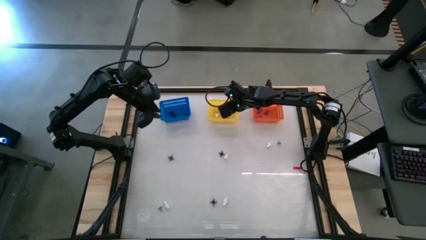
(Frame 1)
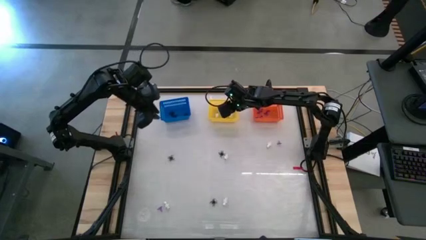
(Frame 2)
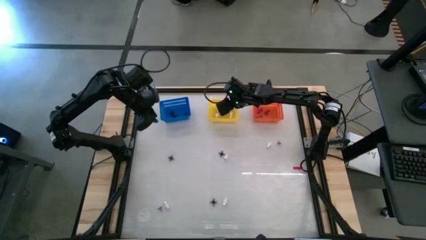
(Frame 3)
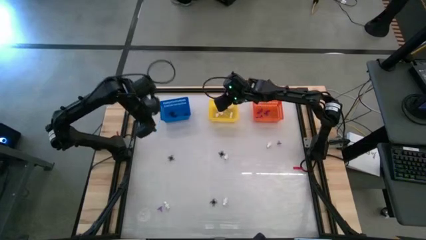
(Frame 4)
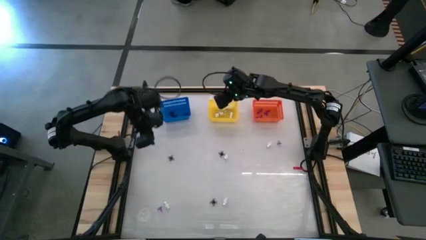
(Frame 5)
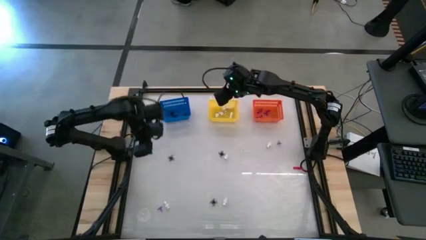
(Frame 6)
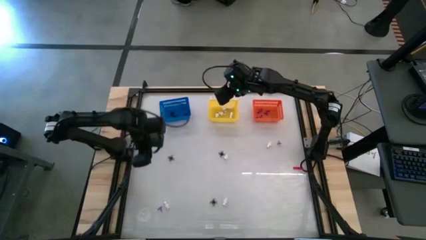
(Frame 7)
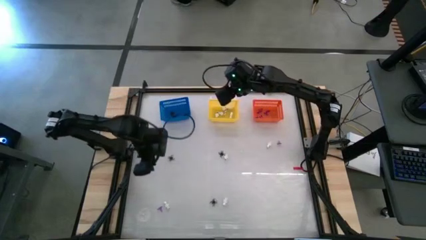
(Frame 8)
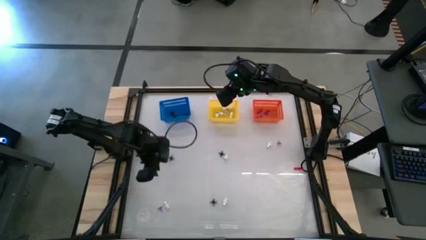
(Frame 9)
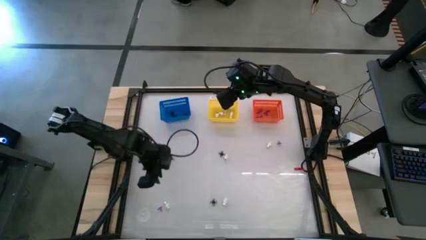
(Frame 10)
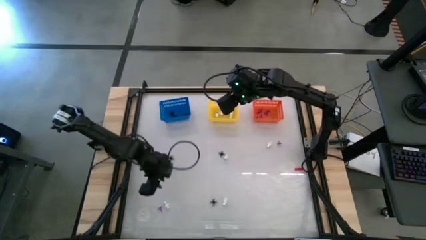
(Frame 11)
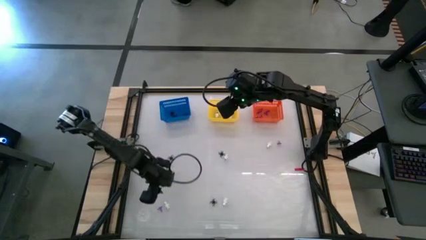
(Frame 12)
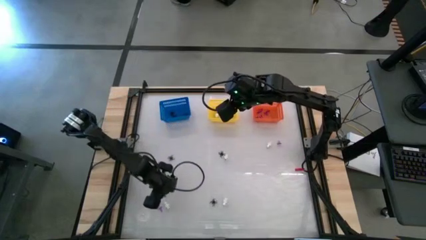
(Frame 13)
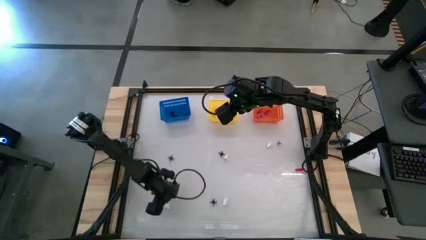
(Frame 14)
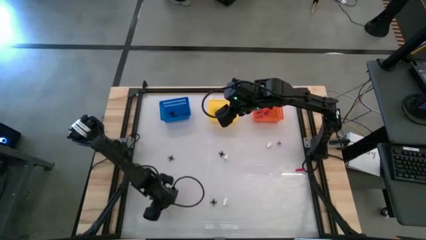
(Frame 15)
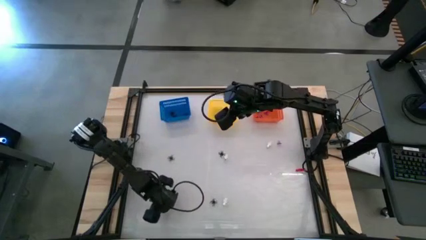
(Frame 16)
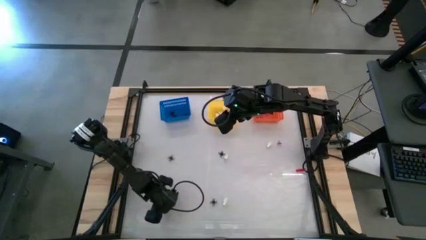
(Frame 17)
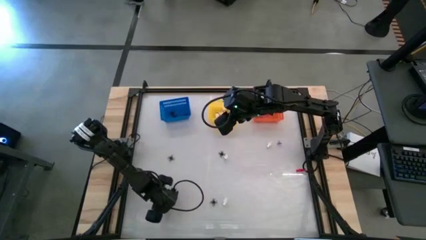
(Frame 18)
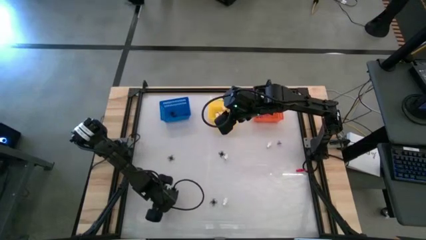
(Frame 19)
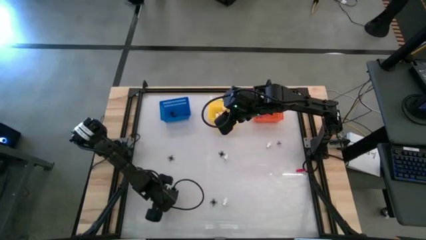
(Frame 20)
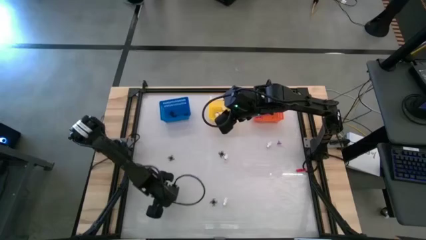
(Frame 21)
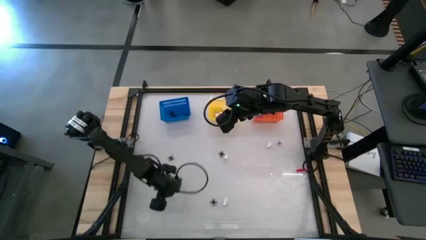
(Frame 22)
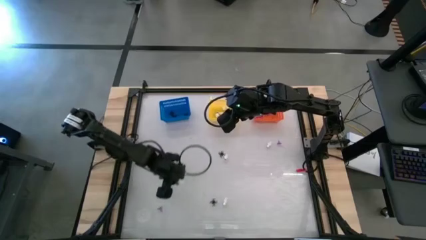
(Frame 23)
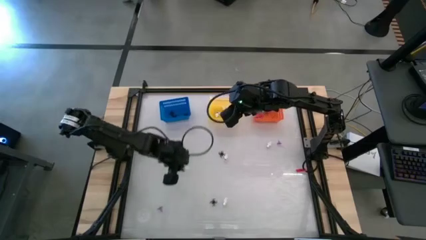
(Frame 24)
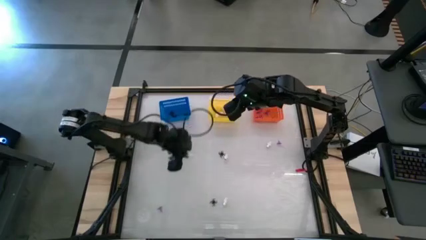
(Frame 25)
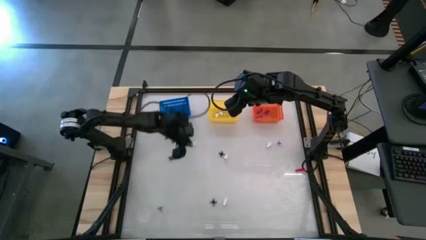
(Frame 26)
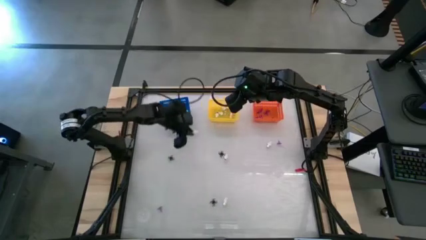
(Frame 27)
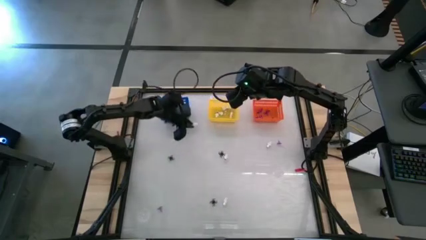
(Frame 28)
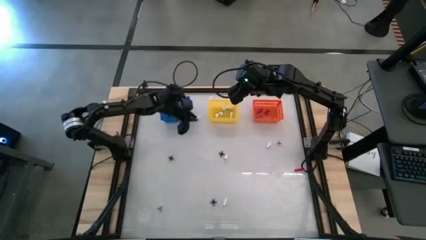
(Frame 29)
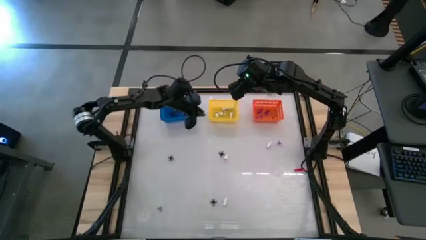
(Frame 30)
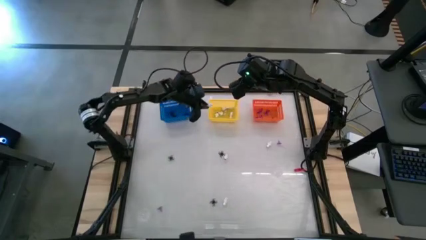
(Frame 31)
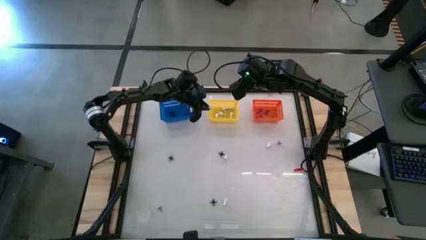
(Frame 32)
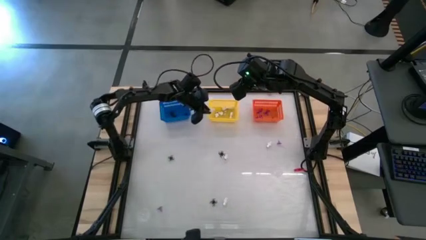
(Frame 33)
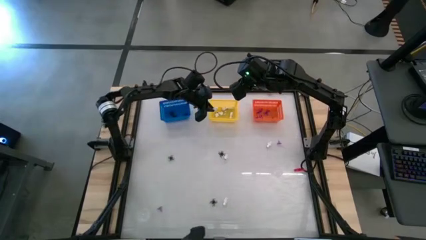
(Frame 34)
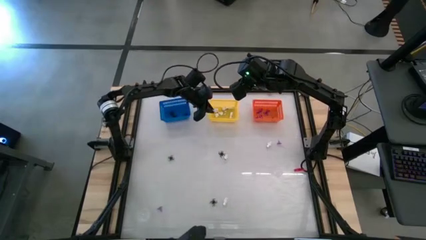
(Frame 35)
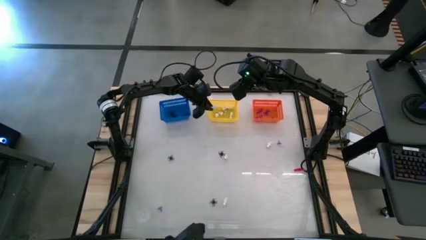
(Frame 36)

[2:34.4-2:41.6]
Task: Sort Halloween decoration
Put the white skeleton toy into the yellow basket

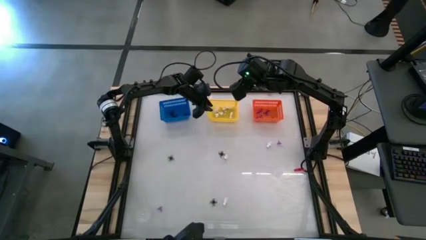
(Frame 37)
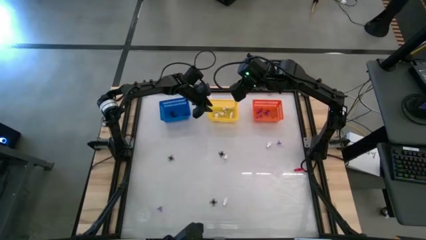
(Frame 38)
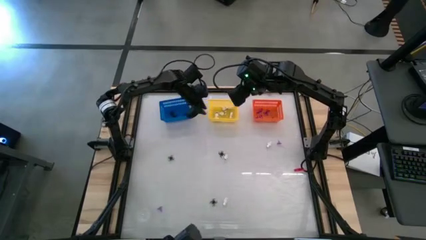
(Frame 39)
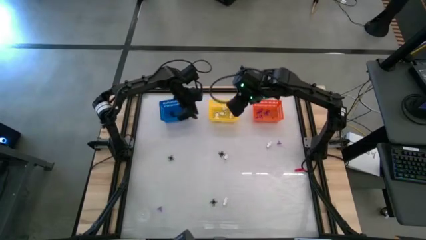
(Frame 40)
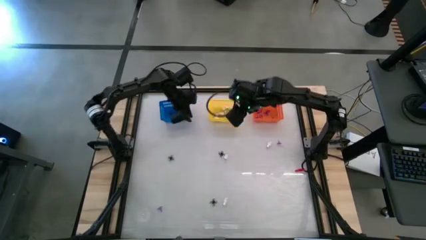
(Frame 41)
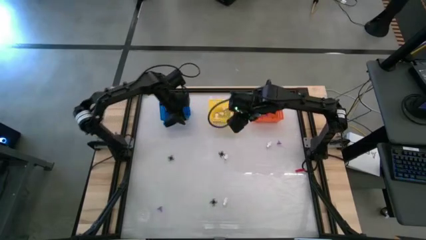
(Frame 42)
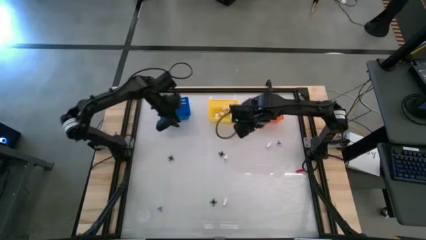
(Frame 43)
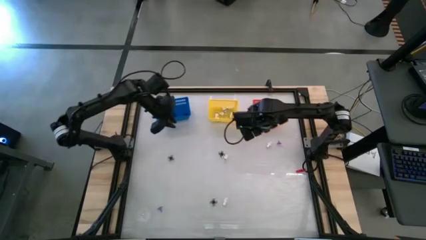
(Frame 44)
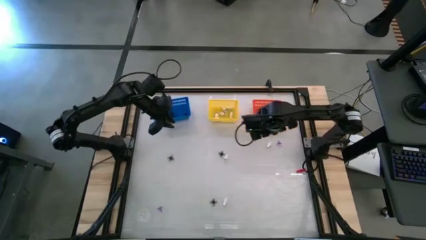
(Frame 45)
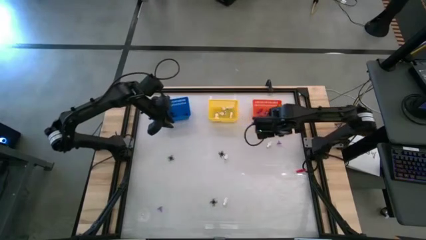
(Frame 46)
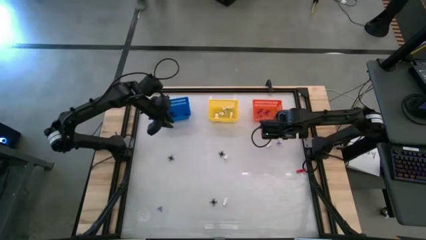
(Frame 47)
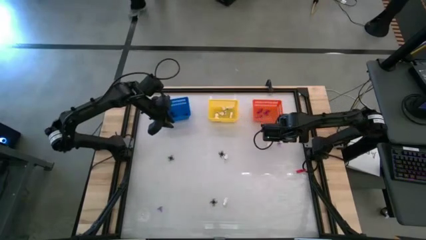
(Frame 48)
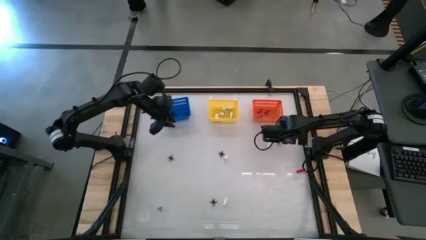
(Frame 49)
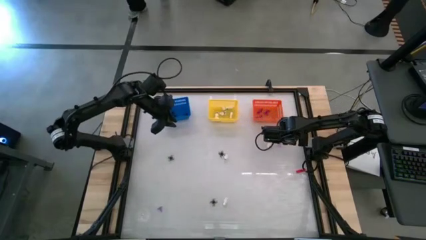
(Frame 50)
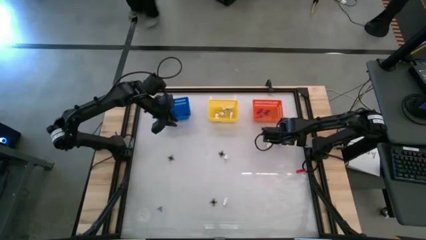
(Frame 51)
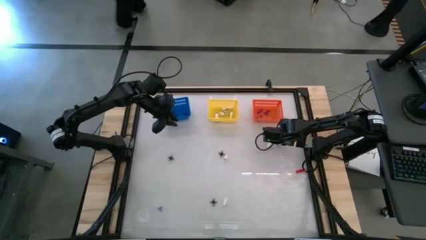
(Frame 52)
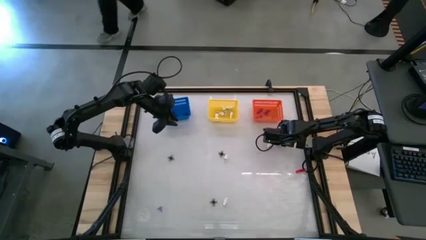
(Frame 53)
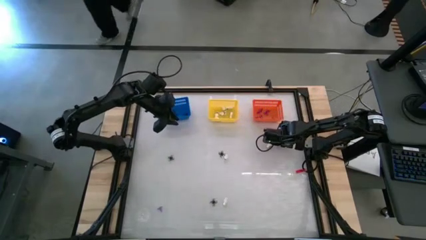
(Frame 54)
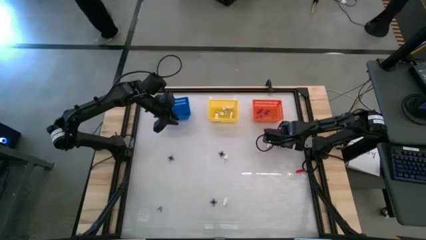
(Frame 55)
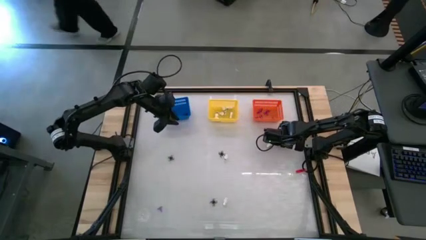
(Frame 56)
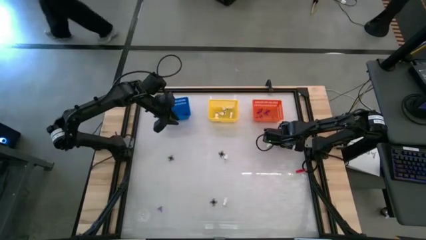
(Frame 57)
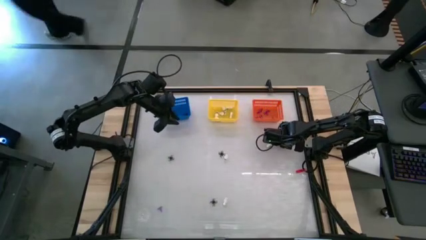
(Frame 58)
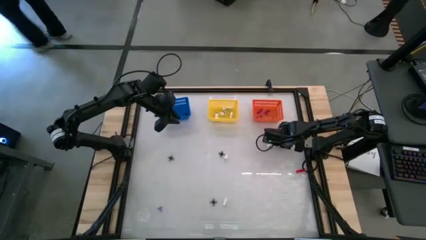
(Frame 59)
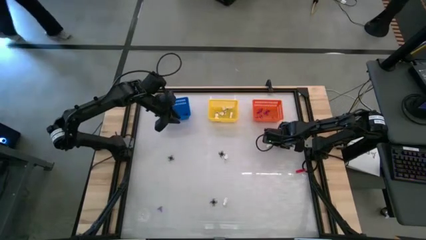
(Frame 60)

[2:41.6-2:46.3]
Put the purple witch hat toy into the orange basket

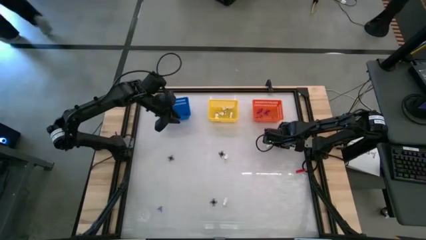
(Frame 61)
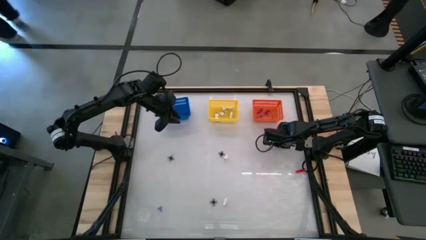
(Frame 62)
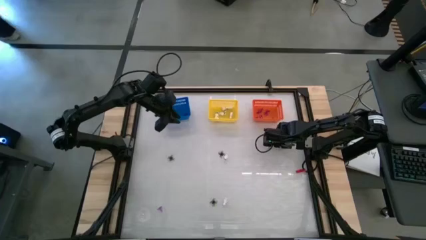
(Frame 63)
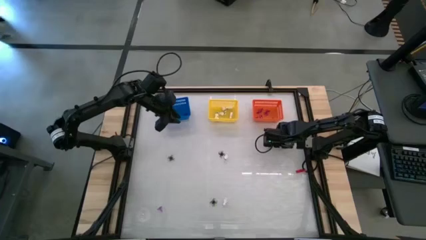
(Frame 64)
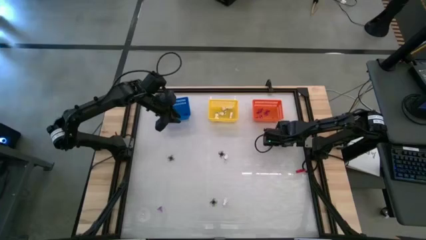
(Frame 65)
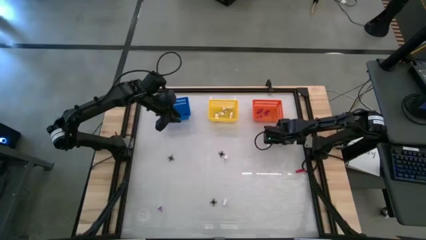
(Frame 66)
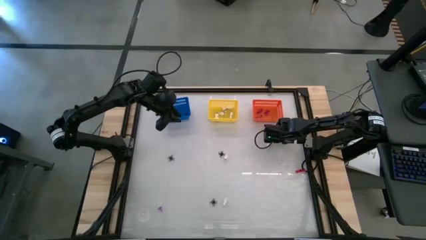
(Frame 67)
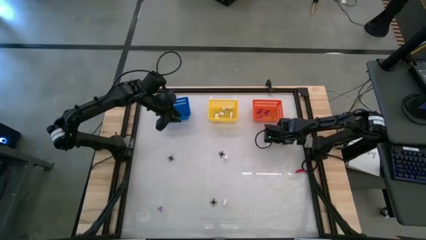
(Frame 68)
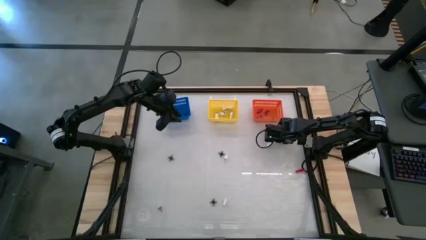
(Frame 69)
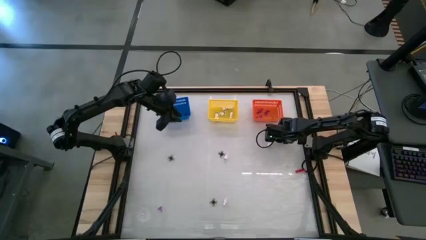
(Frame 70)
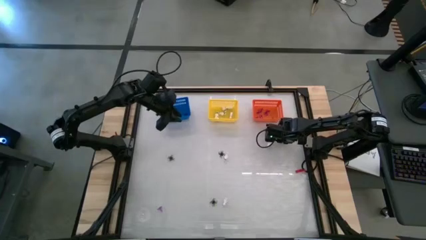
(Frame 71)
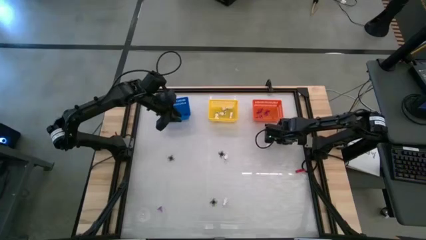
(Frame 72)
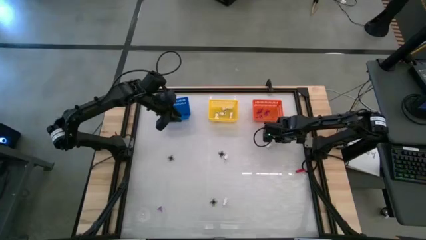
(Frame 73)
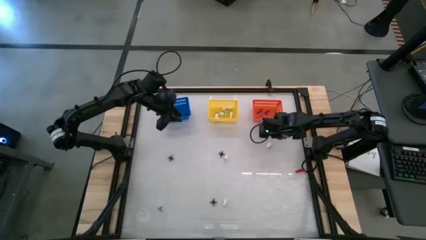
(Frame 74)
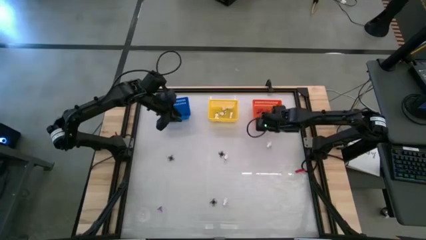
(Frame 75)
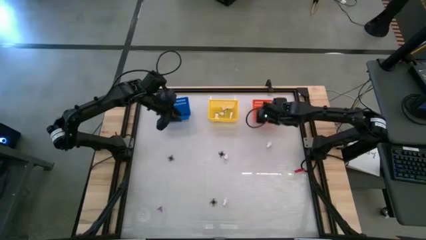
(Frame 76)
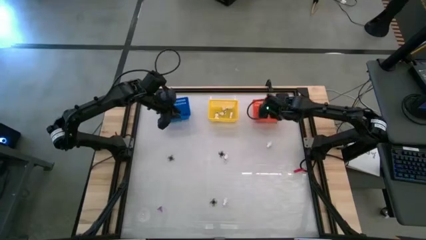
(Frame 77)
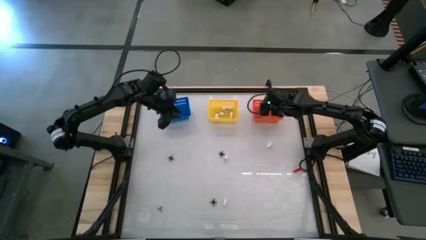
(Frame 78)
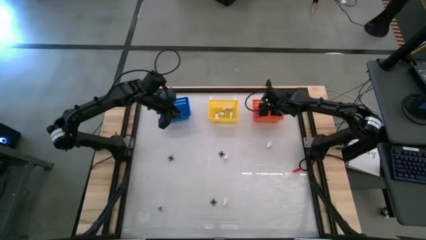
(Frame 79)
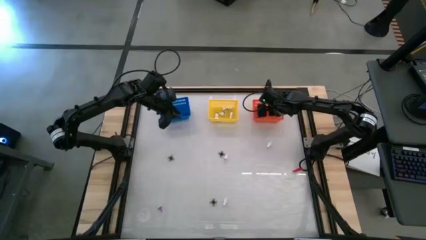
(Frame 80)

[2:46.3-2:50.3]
Put the purple witch hat toy into the orange basket

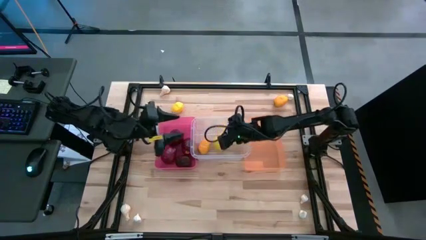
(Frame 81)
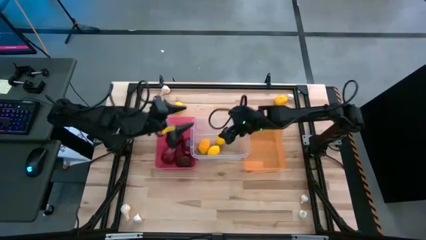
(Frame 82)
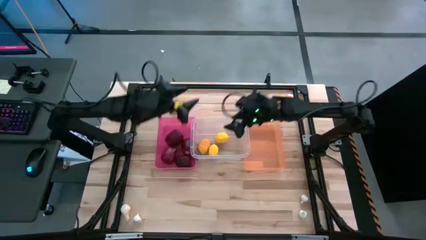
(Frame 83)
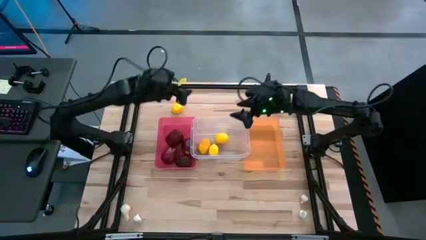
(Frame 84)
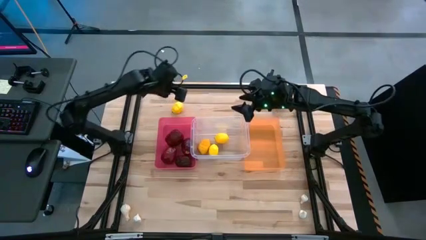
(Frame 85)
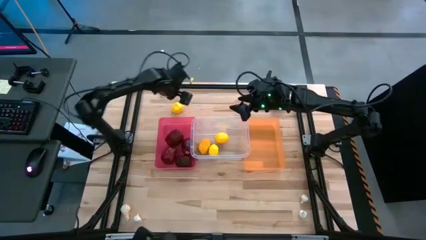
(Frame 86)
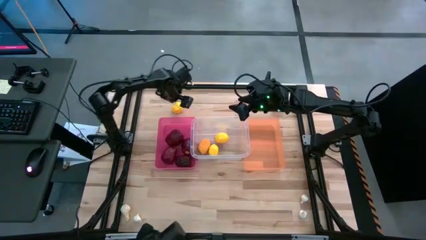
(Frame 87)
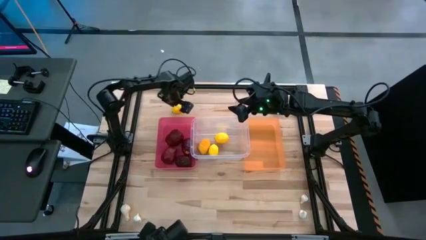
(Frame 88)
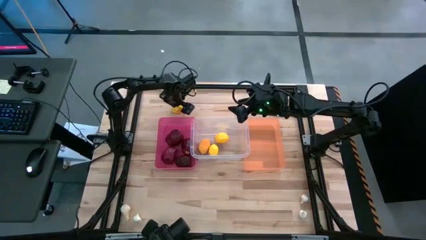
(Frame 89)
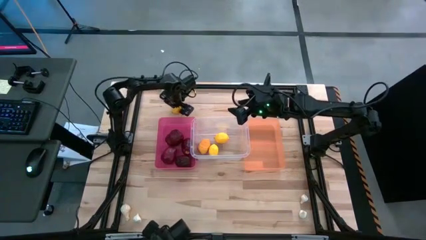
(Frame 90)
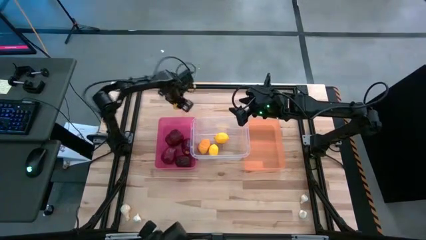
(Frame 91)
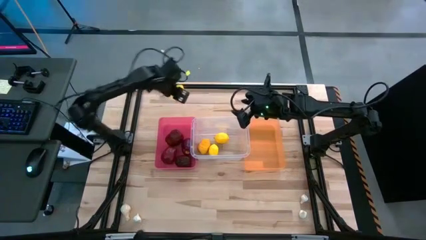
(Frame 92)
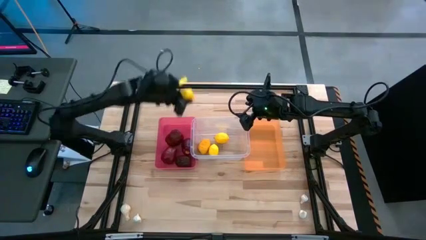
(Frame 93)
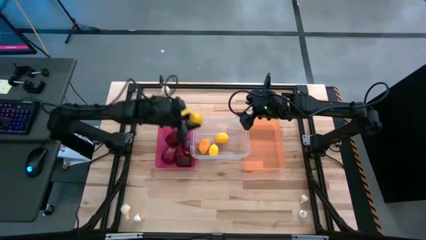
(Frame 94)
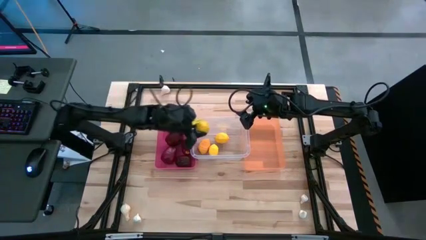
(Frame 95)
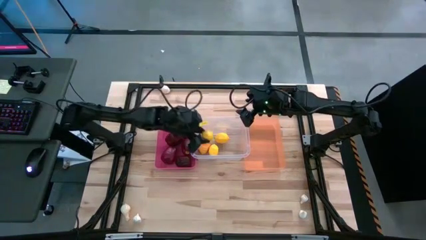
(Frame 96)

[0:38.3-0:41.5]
Task: Sort produce into baskets
Put the yellow lemon into the transparent bin
